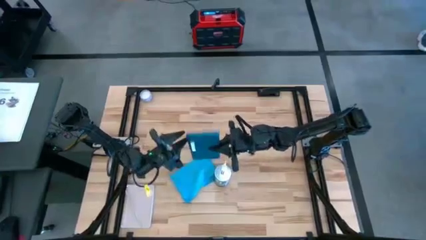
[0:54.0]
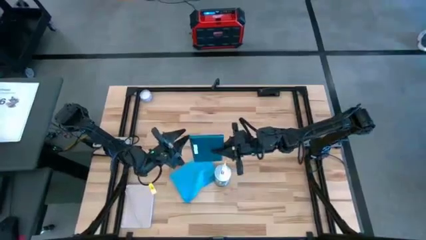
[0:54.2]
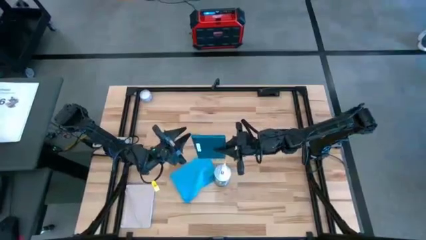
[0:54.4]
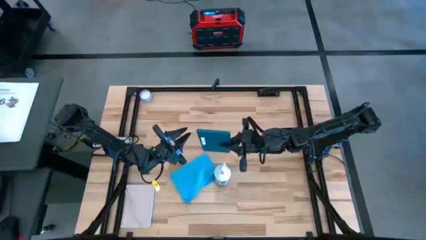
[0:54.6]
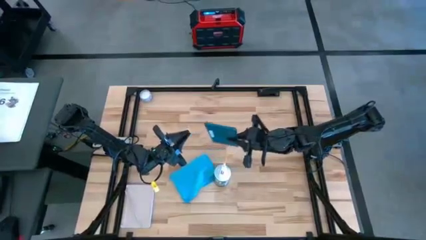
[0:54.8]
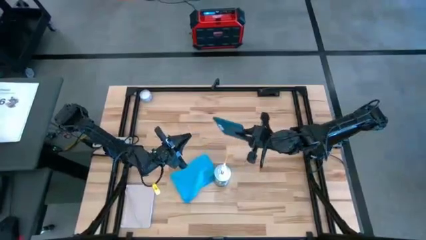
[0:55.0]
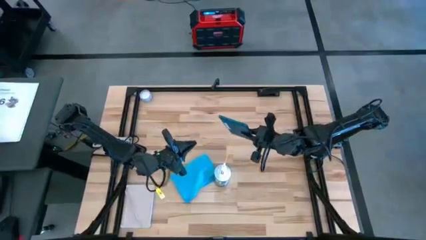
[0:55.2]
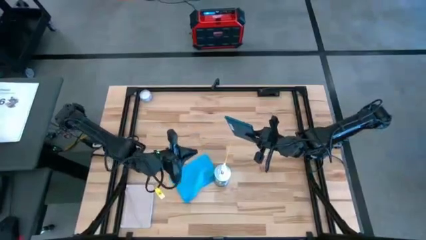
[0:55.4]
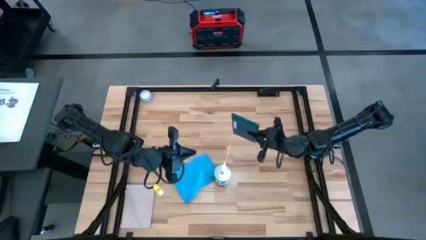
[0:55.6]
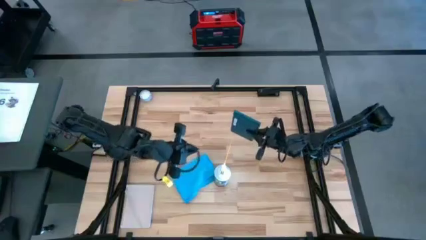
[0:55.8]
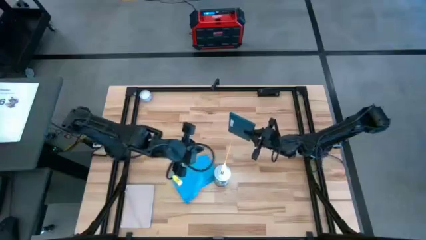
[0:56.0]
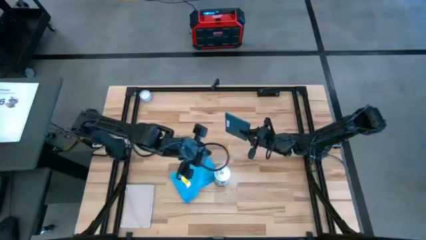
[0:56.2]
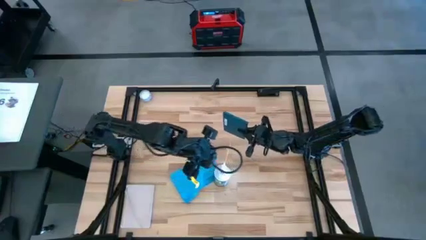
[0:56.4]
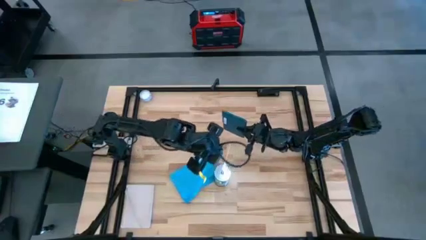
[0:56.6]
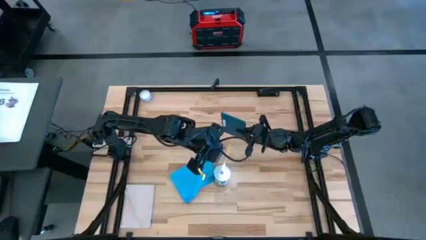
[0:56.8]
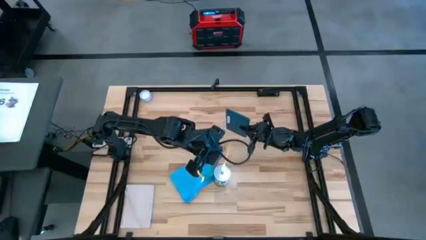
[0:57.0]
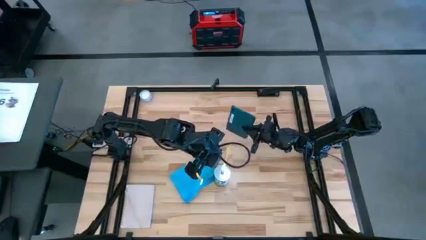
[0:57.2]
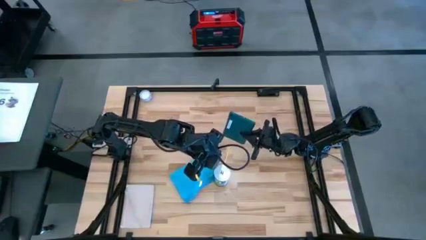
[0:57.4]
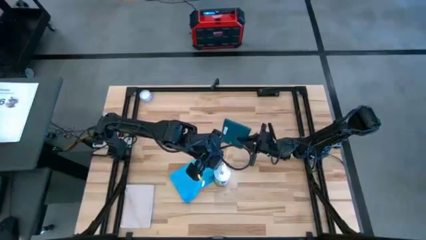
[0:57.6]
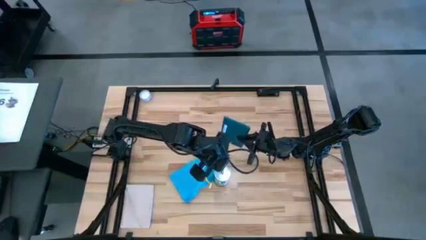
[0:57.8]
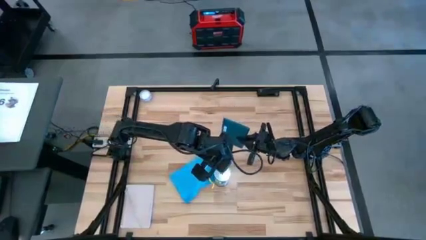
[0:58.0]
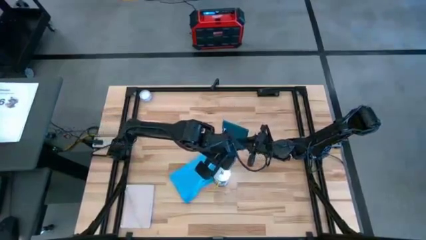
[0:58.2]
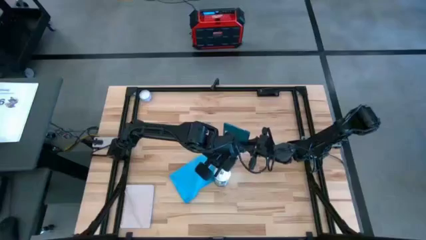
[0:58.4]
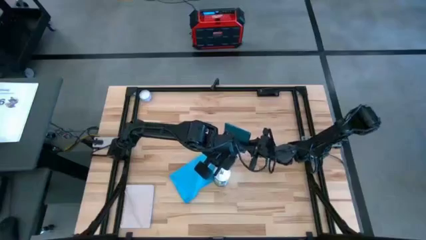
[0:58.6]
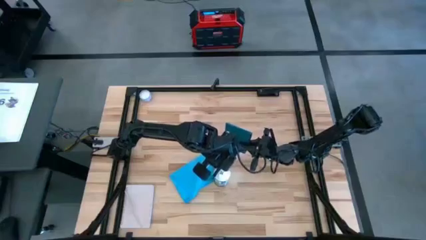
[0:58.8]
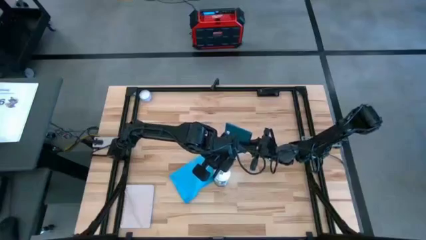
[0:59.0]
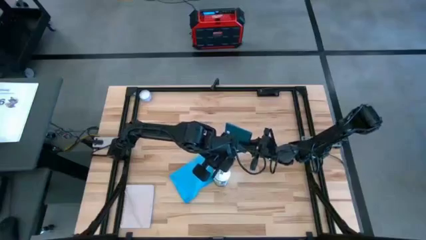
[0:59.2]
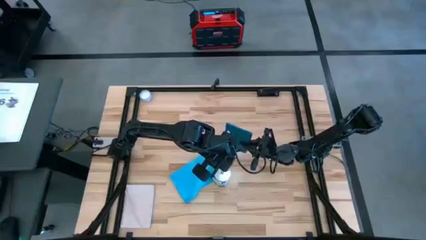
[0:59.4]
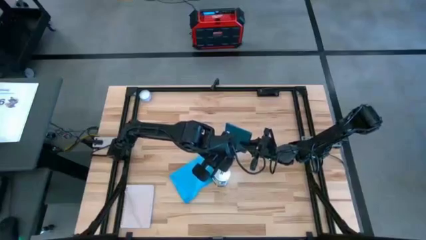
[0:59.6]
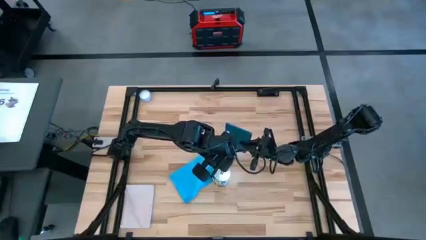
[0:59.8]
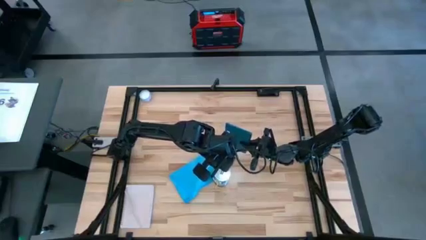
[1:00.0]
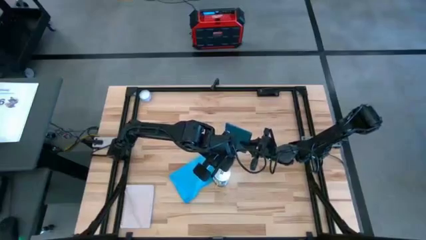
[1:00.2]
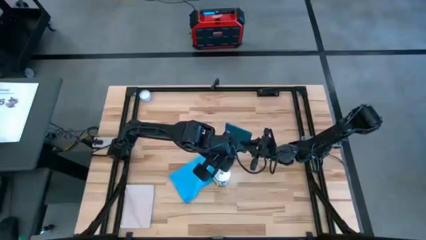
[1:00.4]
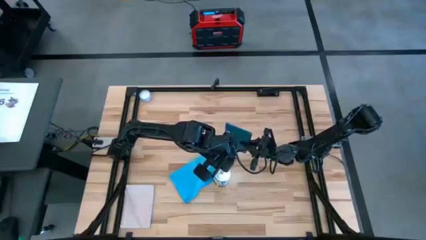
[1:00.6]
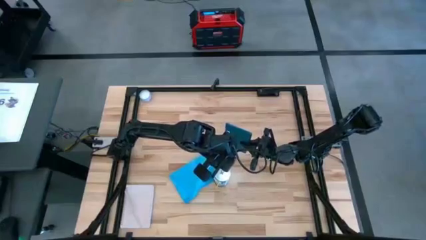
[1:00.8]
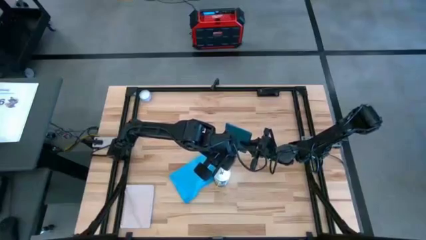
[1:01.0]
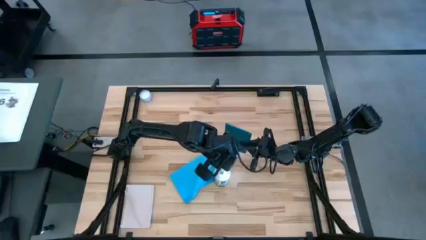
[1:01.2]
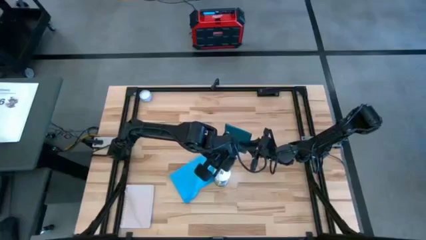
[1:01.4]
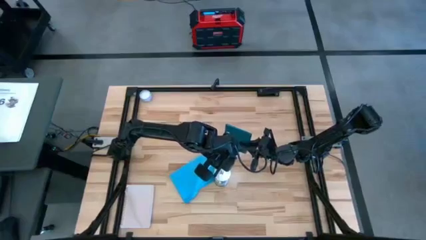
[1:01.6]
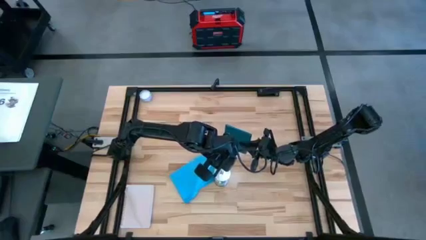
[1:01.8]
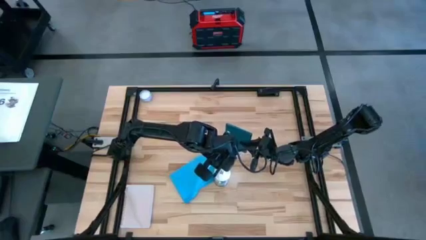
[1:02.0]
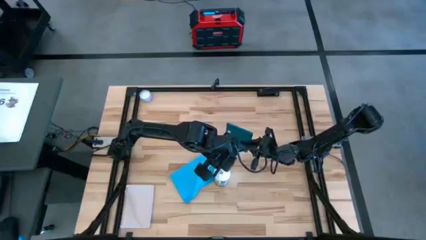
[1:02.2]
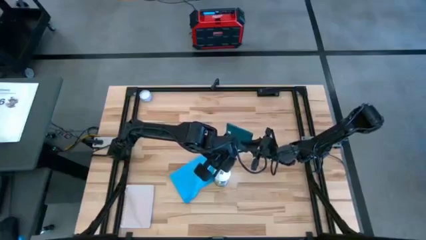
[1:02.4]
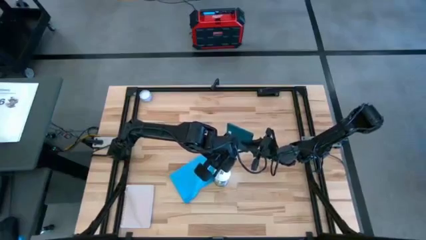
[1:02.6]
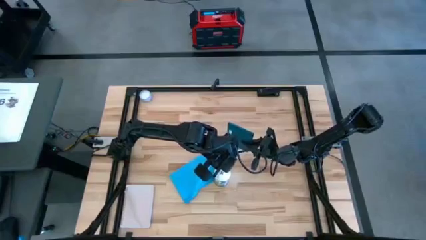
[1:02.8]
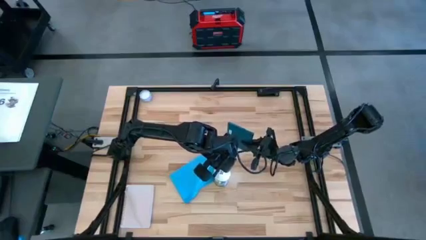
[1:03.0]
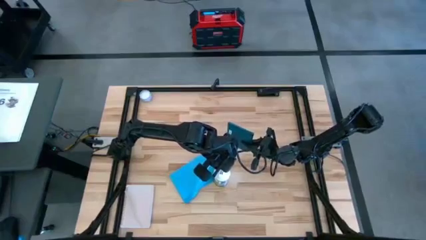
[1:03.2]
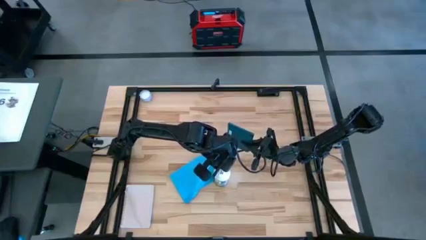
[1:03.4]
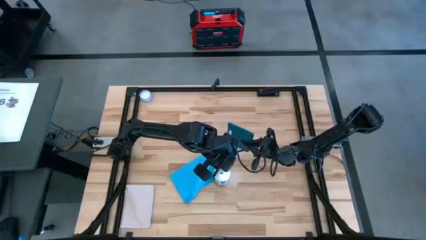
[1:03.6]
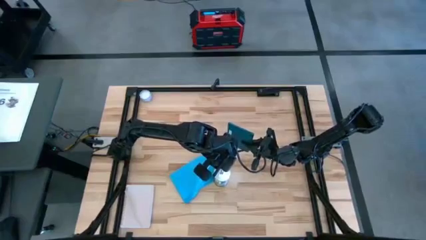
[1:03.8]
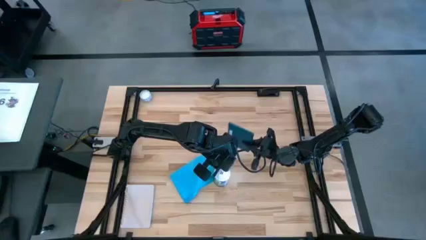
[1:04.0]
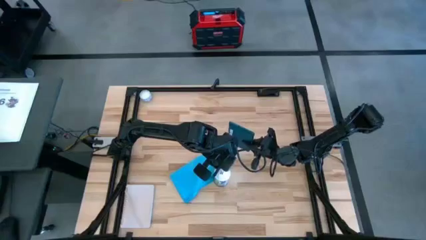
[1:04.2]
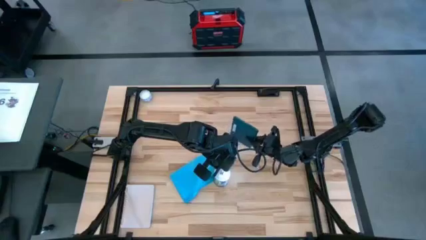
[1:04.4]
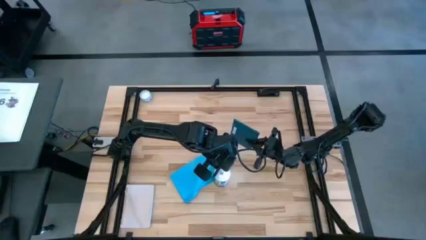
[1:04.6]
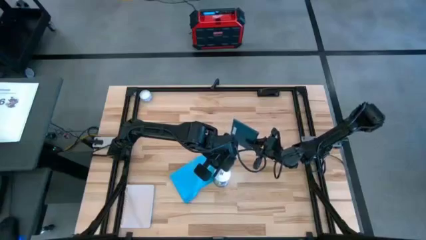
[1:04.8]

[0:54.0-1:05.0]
Task: Apply microfiber cloth
Spray the back of the blue tablet with the spray bottle

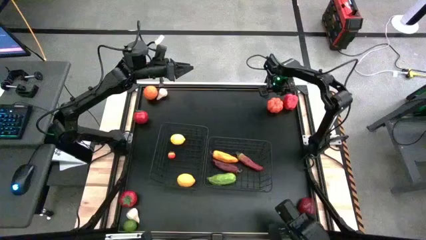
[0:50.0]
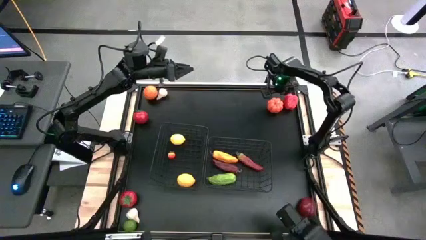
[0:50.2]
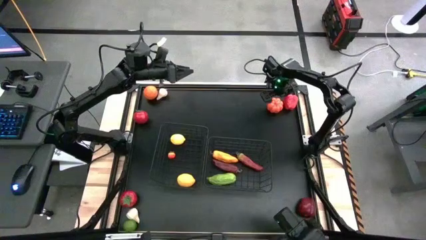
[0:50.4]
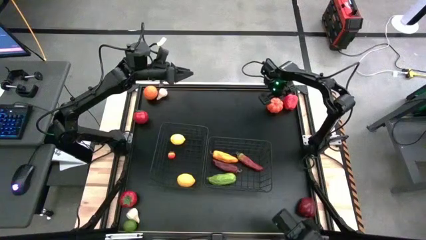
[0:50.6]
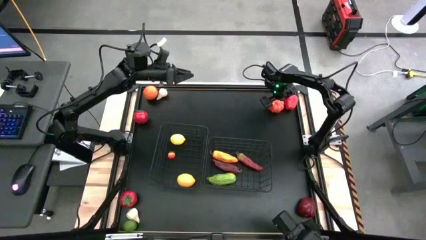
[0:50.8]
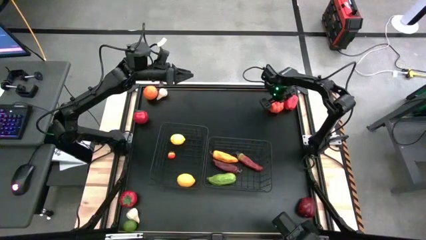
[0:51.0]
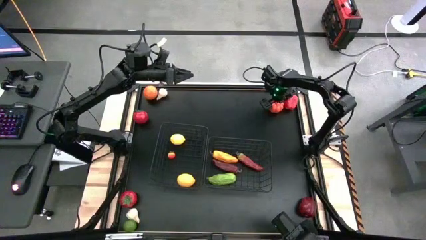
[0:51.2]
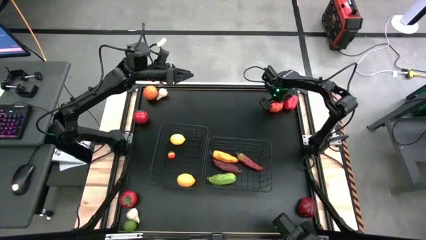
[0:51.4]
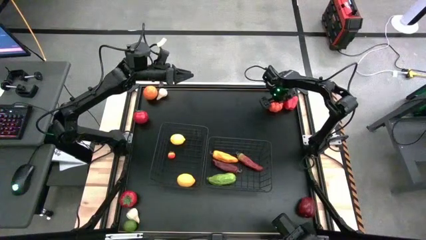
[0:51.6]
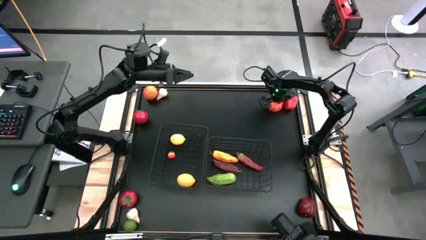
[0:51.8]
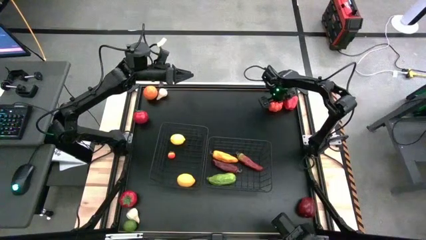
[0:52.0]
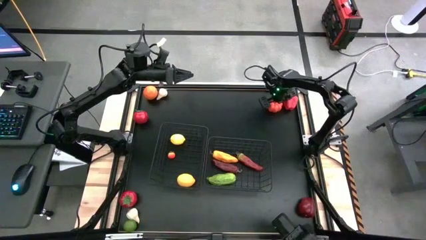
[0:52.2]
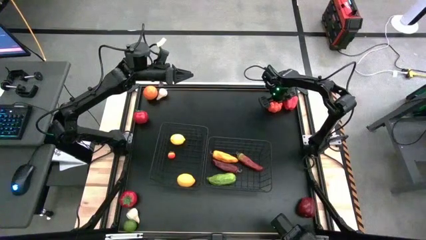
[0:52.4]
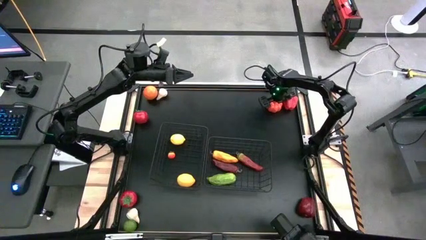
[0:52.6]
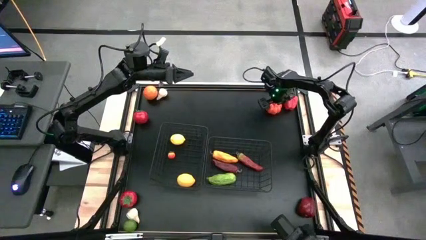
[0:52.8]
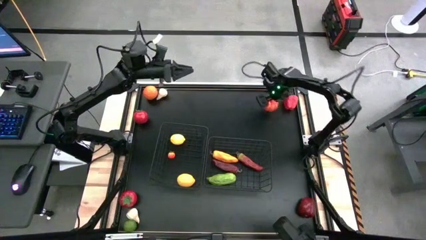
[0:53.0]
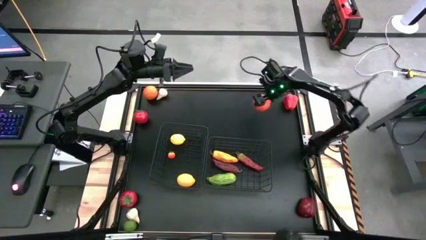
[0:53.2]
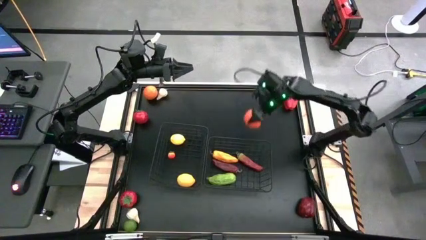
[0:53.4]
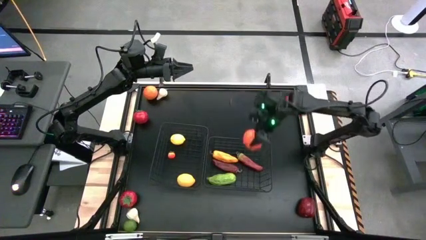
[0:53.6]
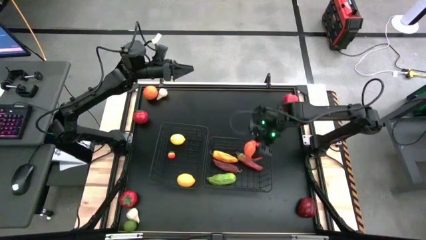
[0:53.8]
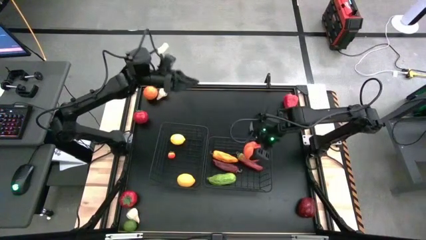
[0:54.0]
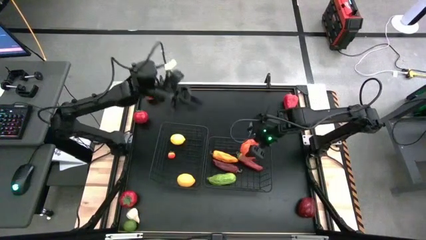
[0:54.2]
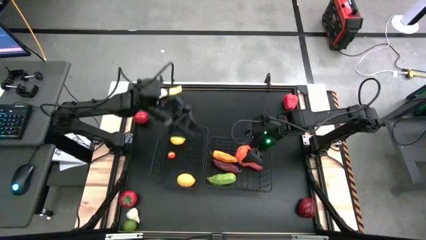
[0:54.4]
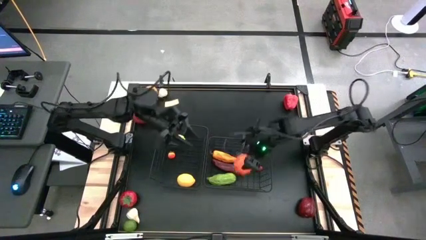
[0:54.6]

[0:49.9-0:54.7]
Task: Sort produce into baskets
Put the orange pumpkin into the right wire basket
